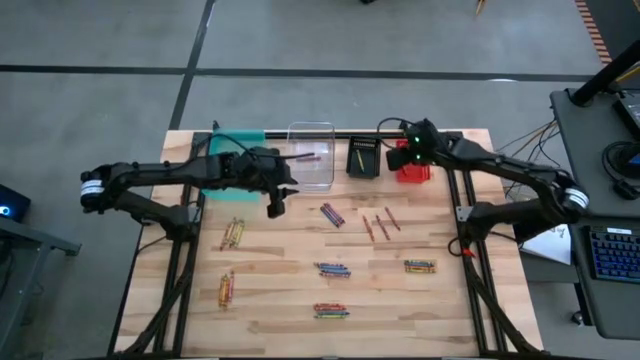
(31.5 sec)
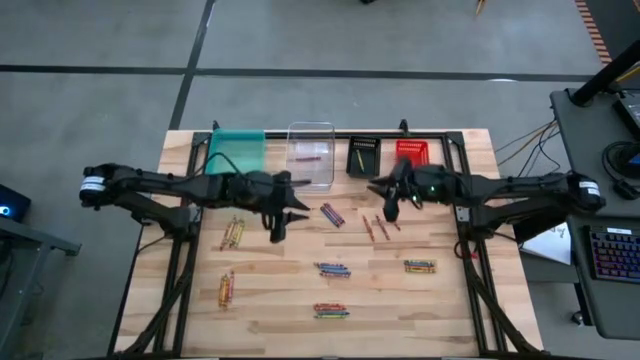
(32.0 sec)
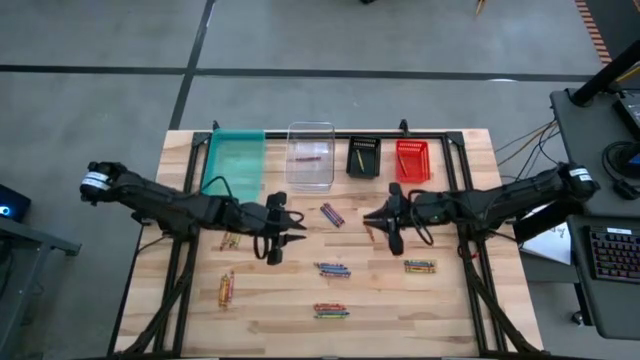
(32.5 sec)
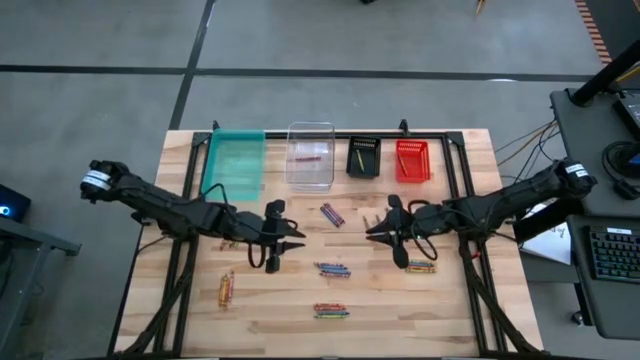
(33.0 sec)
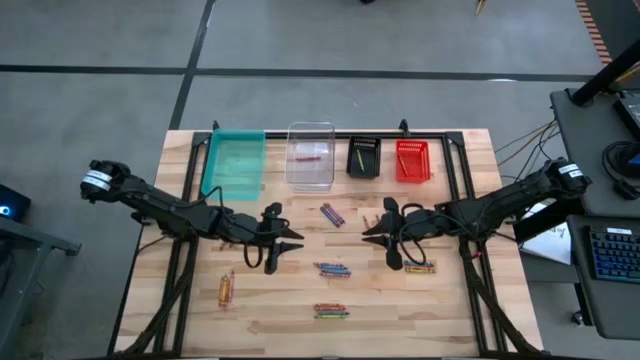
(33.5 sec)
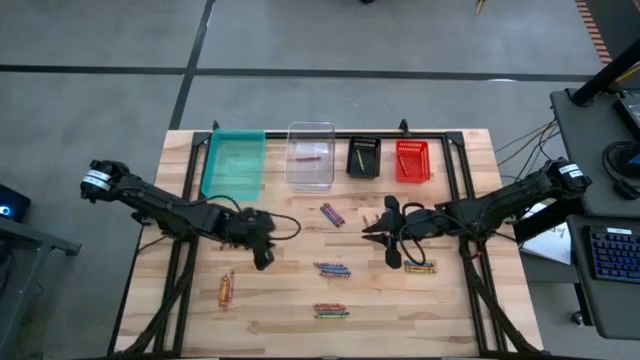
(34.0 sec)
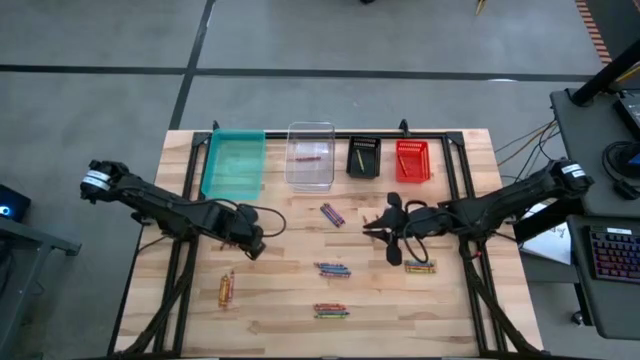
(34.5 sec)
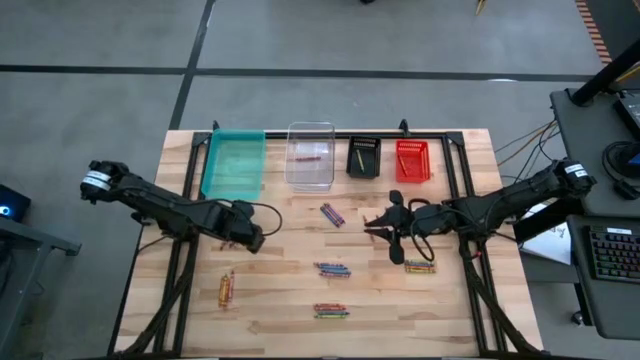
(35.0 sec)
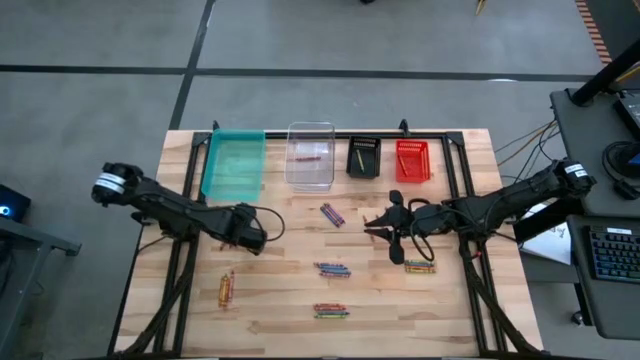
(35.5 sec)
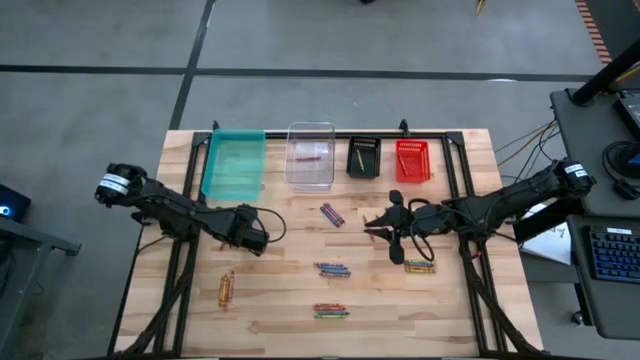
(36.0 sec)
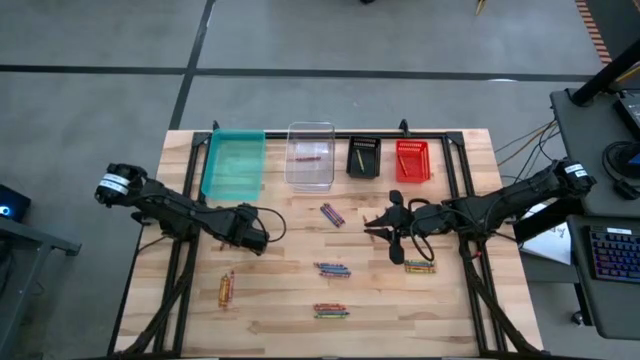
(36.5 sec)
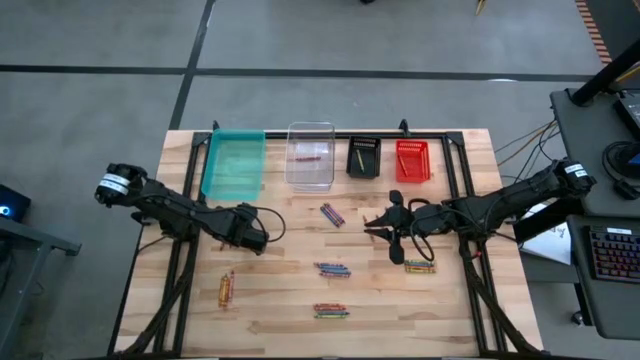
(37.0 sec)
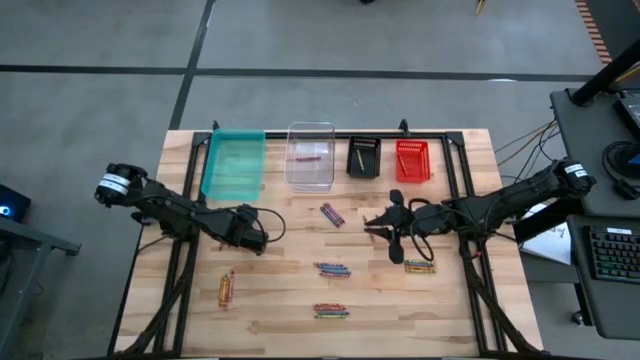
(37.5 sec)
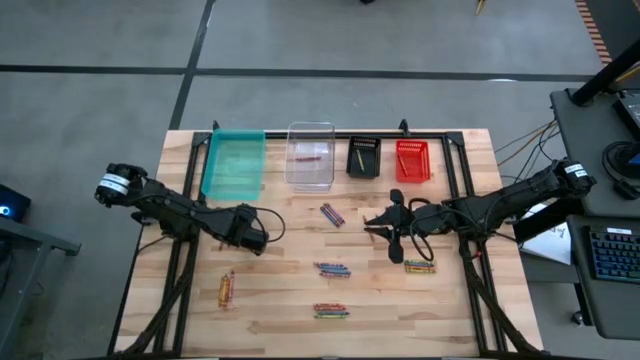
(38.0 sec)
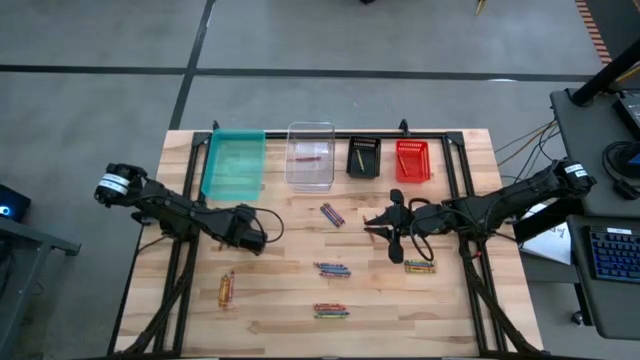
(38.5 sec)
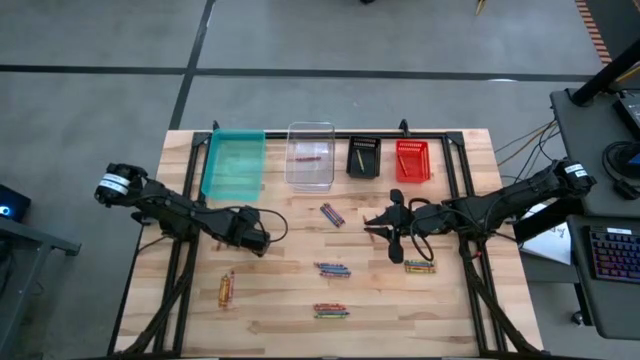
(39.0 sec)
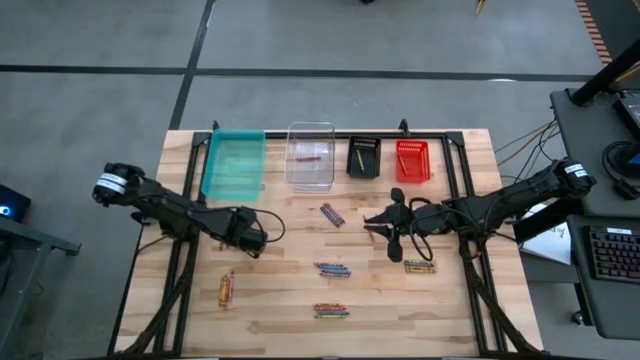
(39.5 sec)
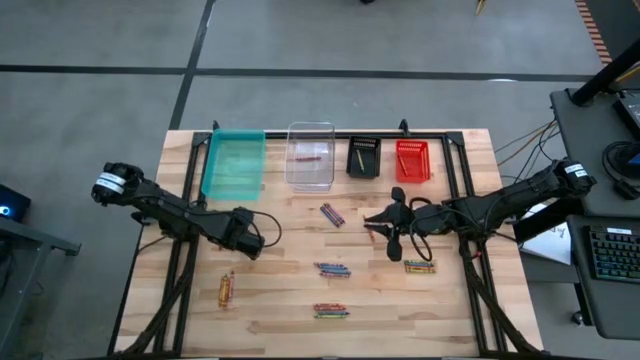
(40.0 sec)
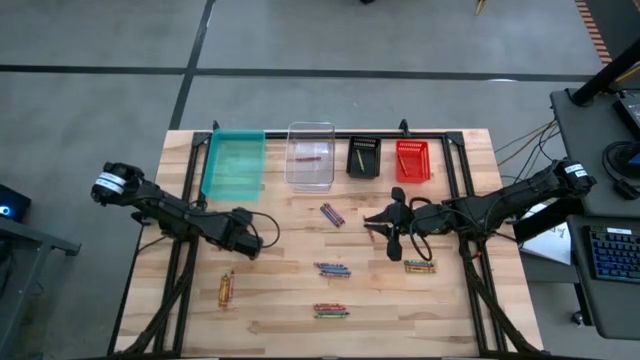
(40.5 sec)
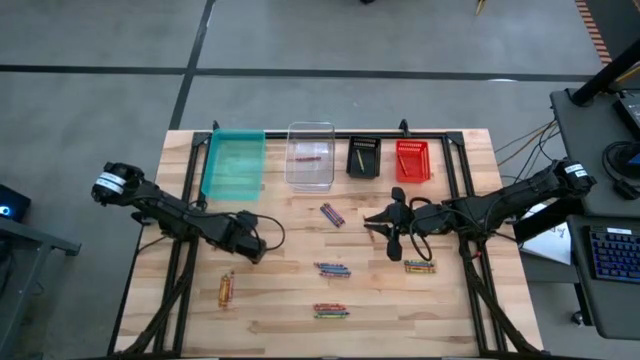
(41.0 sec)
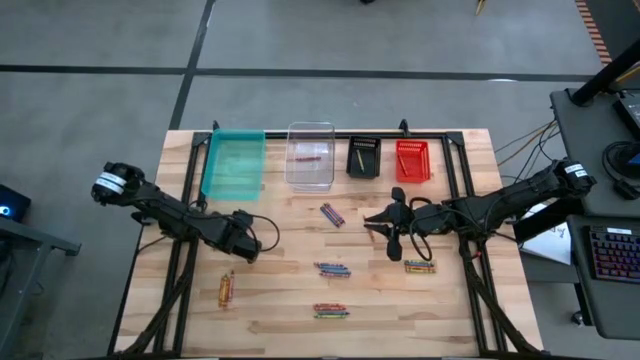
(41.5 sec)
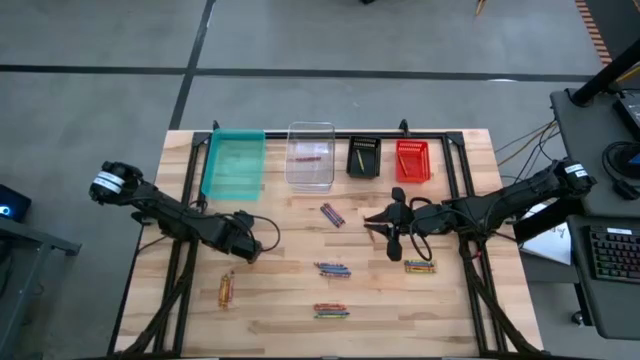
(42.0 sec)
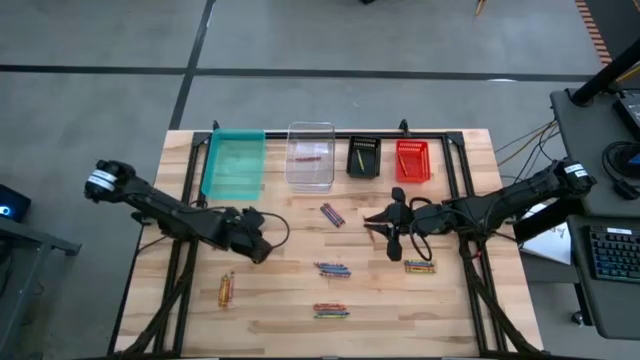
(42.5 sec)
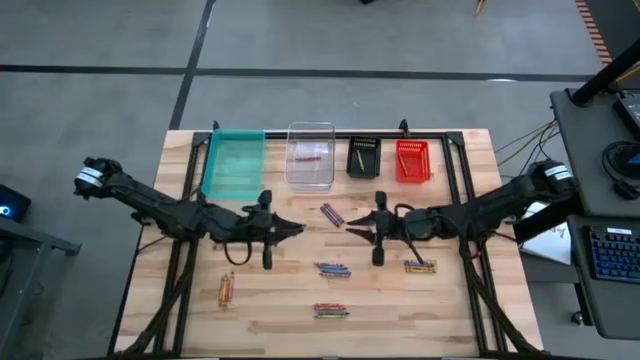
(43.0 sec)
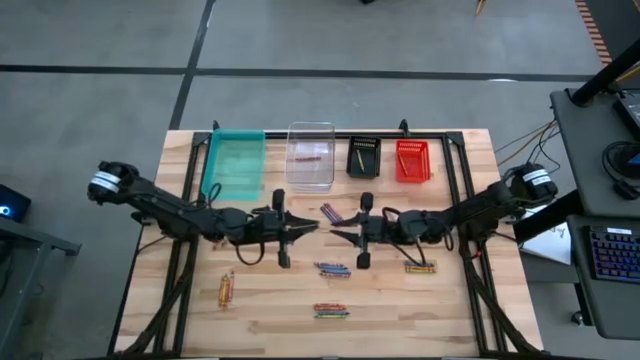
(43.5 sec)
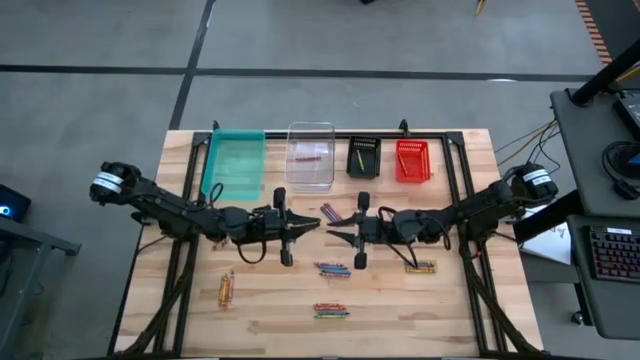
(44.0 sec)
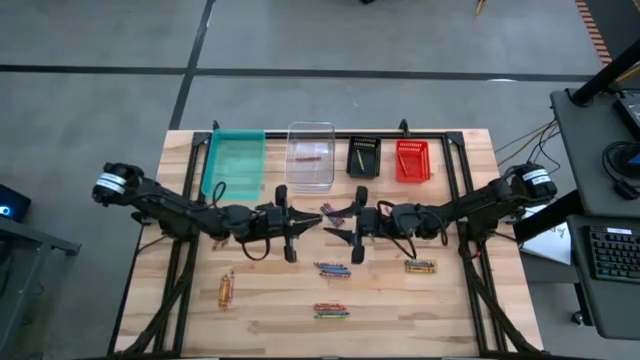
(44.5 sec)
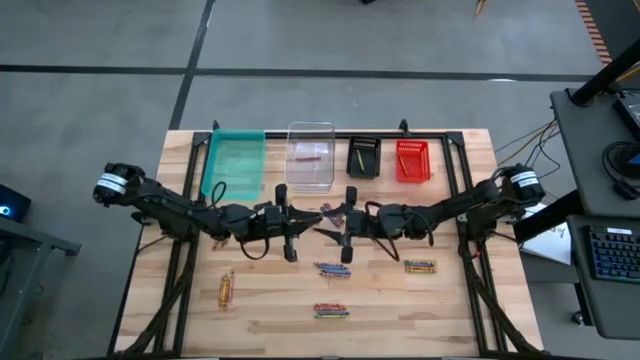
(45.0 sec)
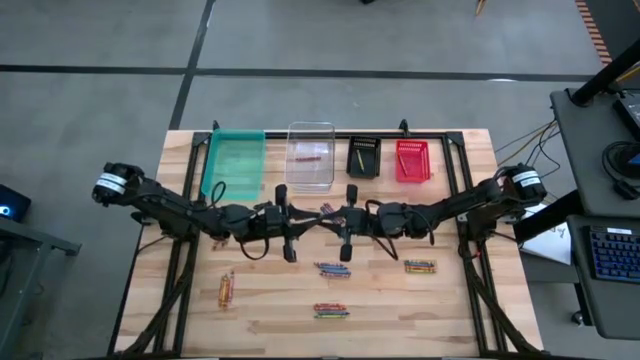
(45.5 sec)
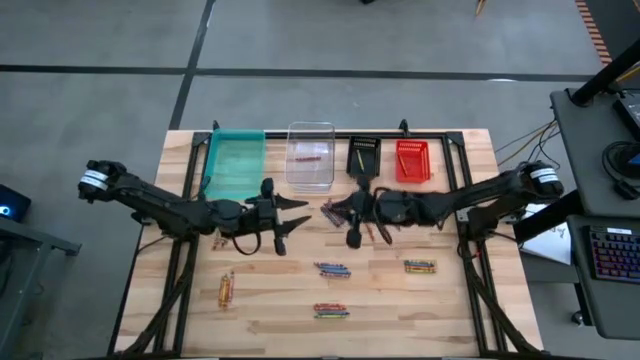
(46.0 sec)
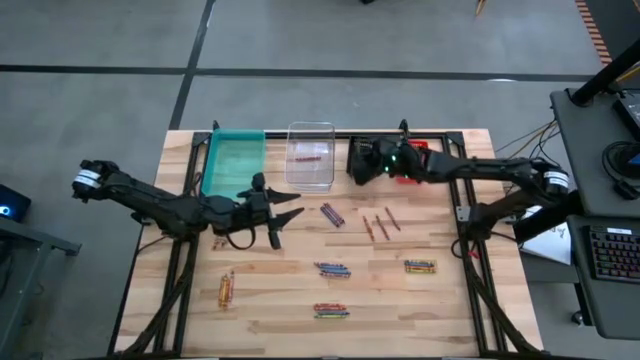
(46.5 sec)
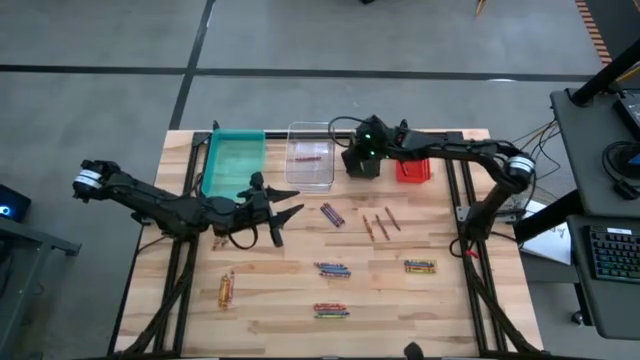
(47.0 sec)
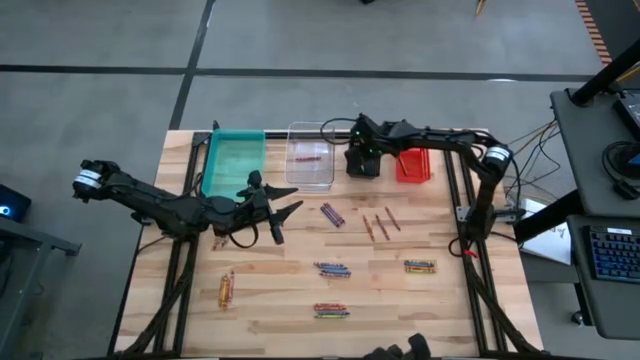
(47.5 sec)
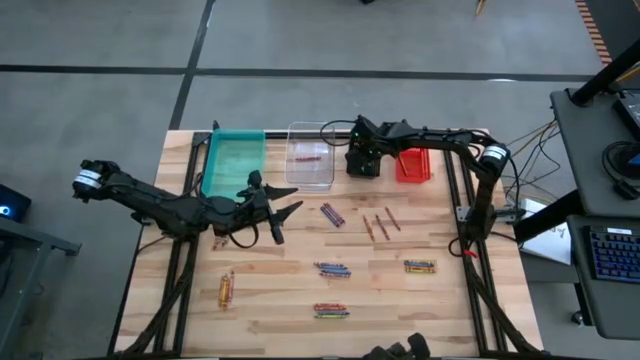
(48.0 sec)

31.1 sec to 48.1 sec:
Task: Sort crayons
Put the green crayon into the black bin

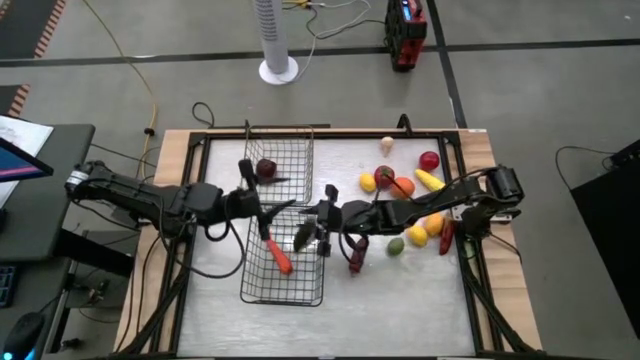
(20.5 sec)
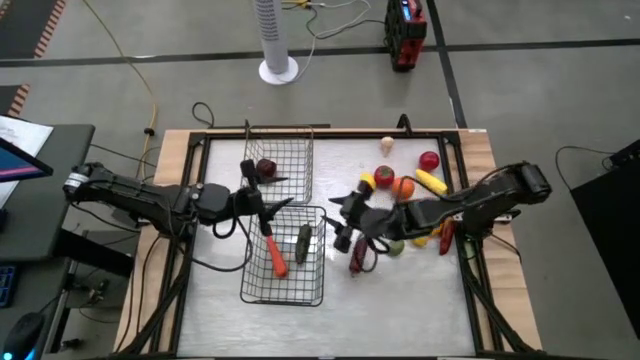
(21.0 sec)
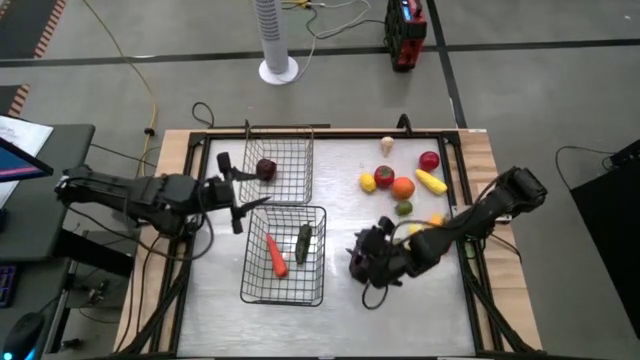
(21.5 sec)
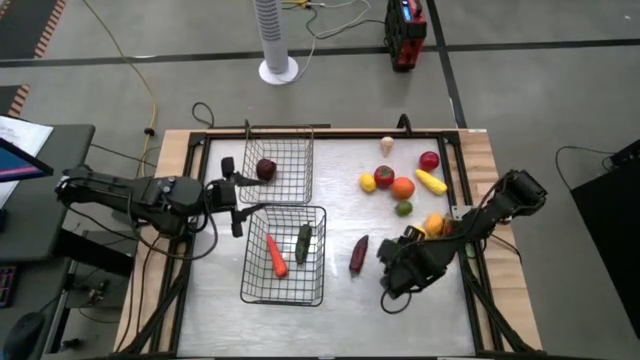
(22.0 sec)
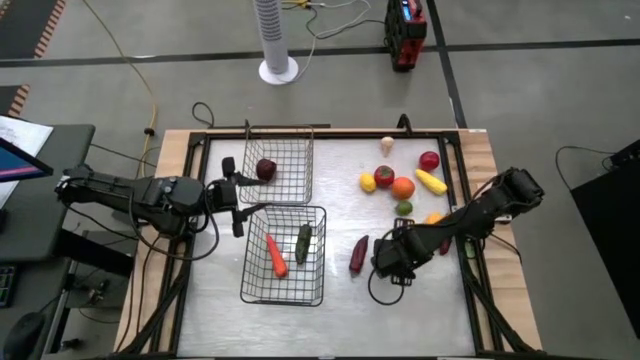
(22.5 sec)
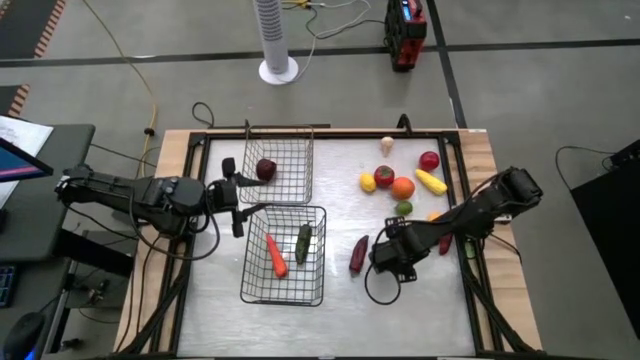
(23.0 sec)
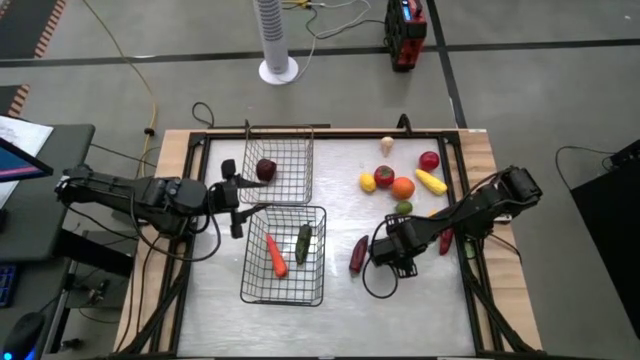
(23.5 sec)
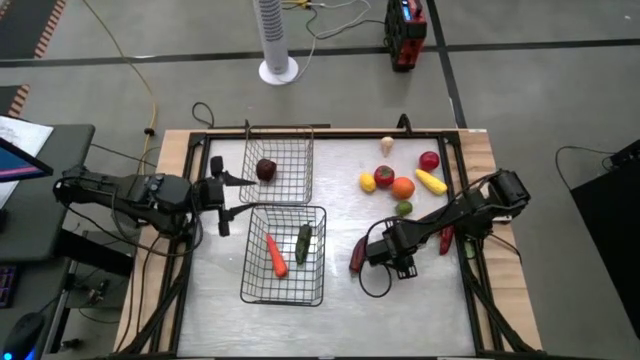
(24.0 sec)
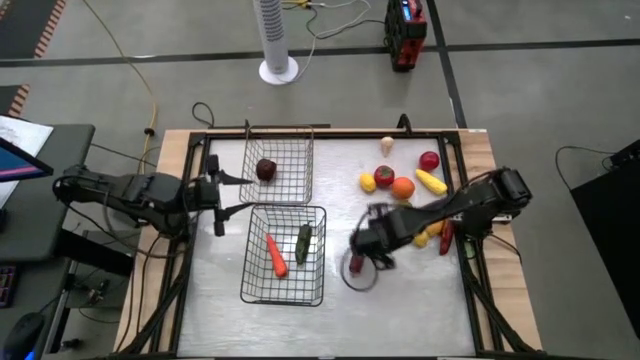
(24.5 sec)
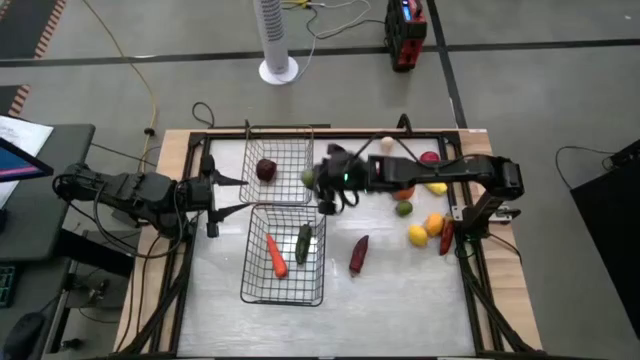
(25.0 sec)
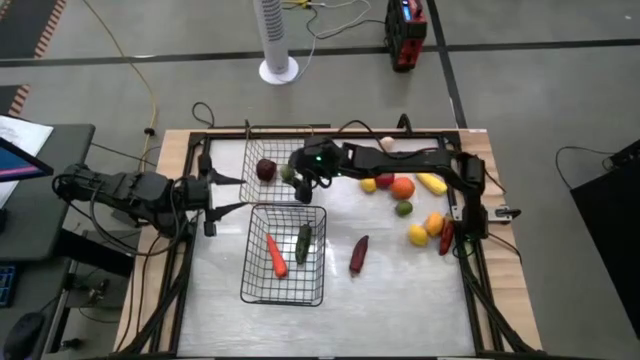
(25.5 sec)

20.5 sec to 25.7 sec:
Task: Sort produce into baskets
Put the bottom lime into the gold wire basket
